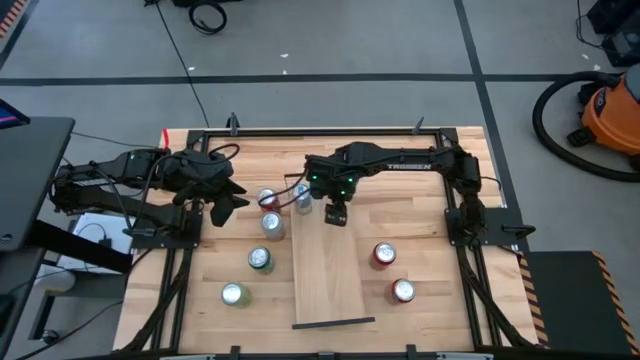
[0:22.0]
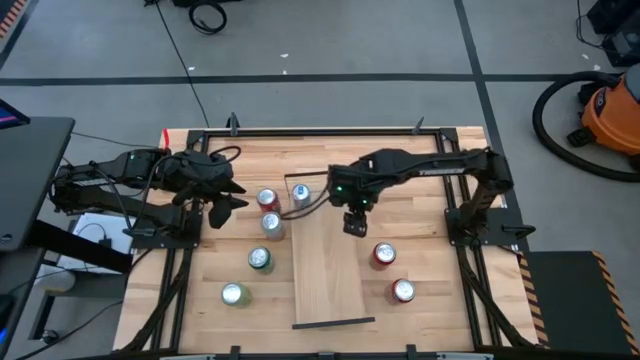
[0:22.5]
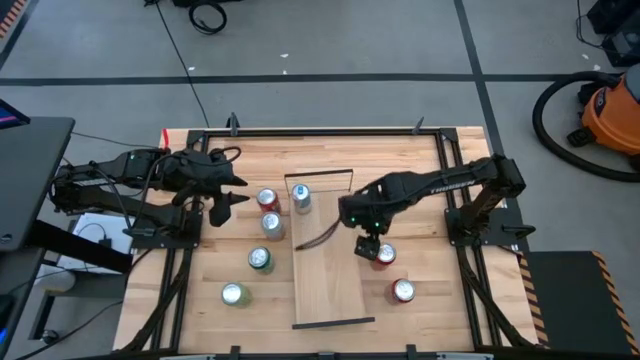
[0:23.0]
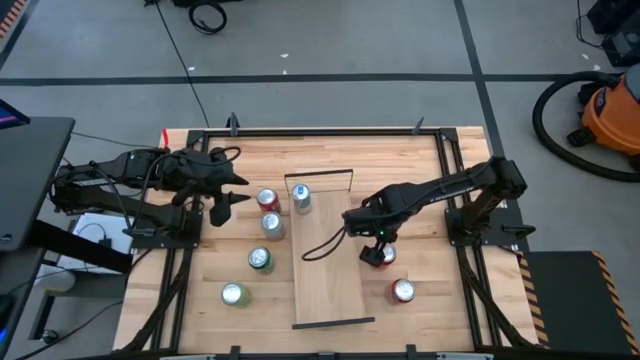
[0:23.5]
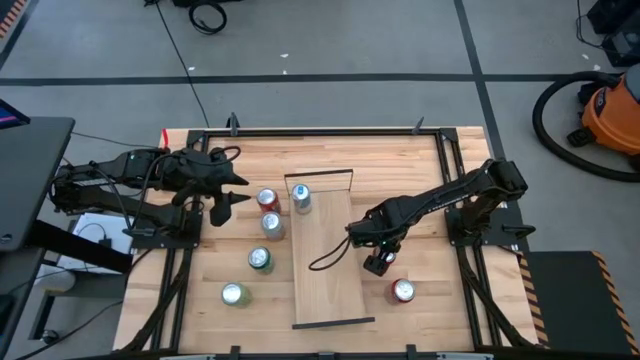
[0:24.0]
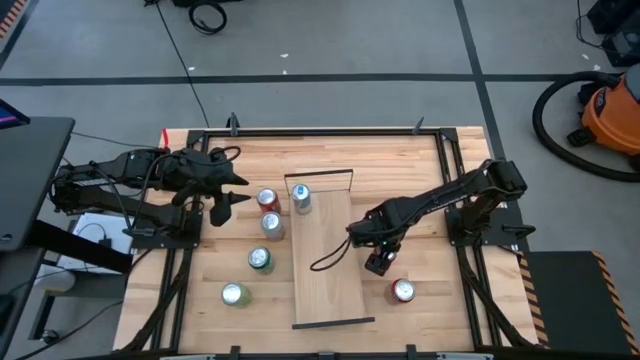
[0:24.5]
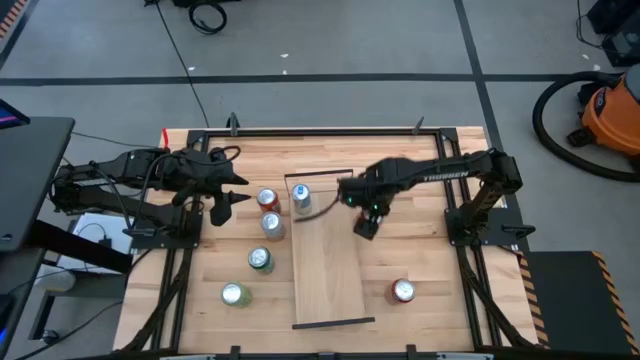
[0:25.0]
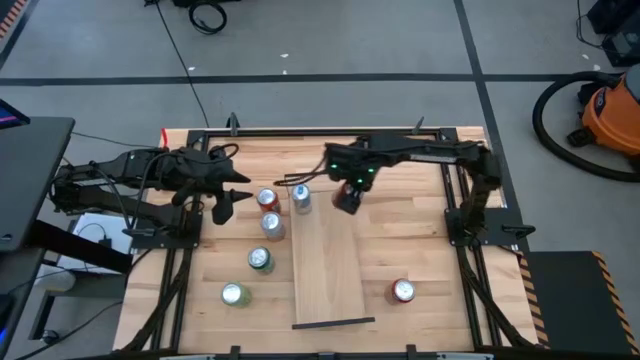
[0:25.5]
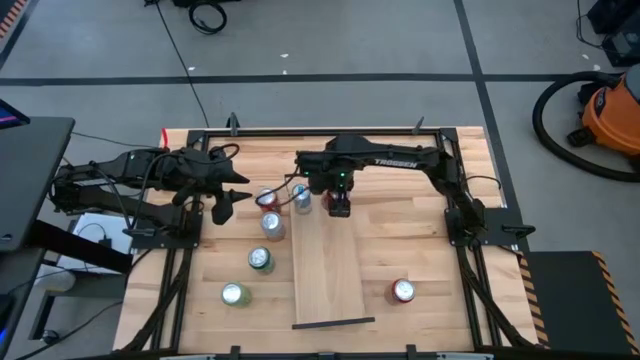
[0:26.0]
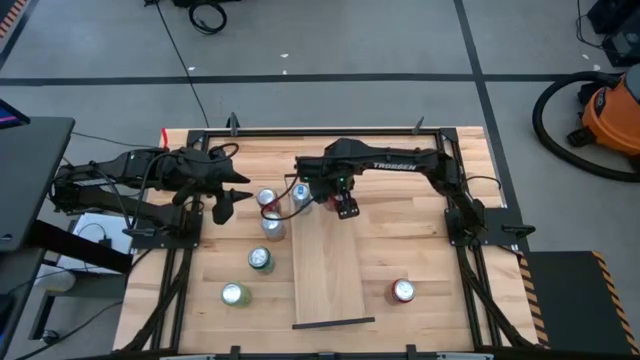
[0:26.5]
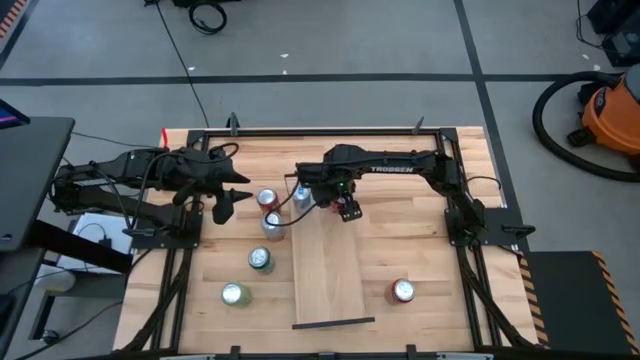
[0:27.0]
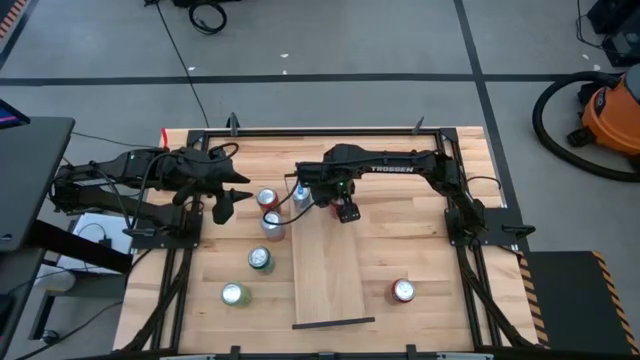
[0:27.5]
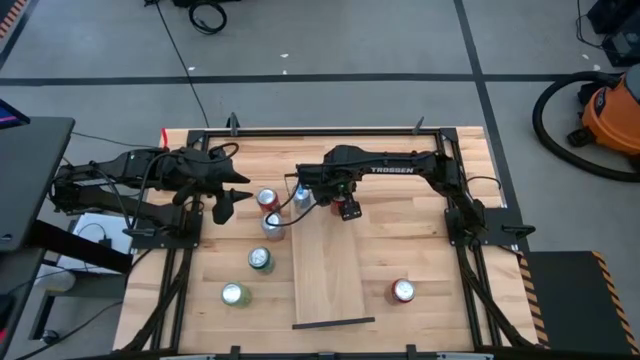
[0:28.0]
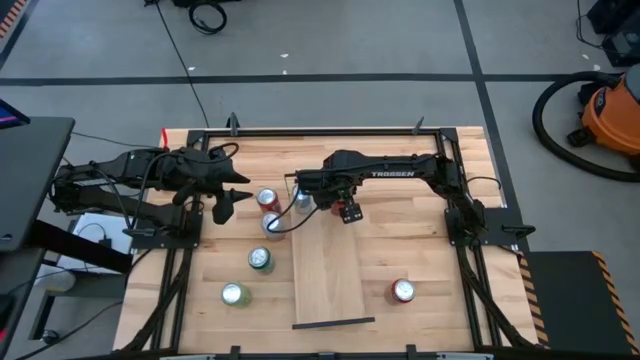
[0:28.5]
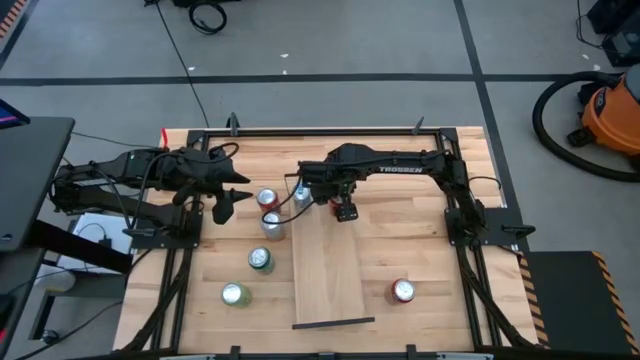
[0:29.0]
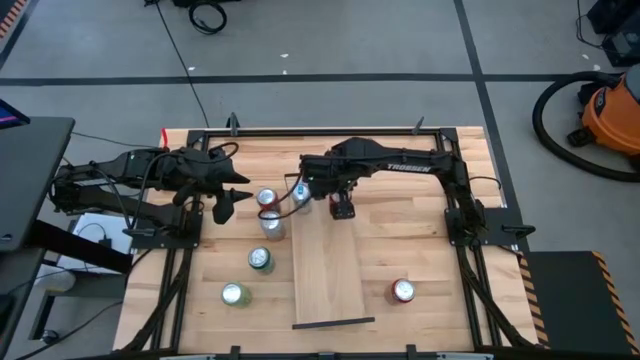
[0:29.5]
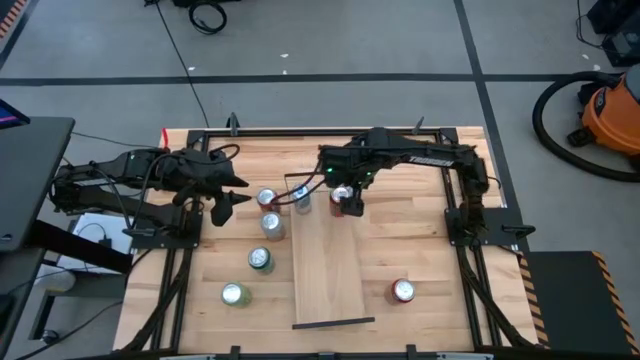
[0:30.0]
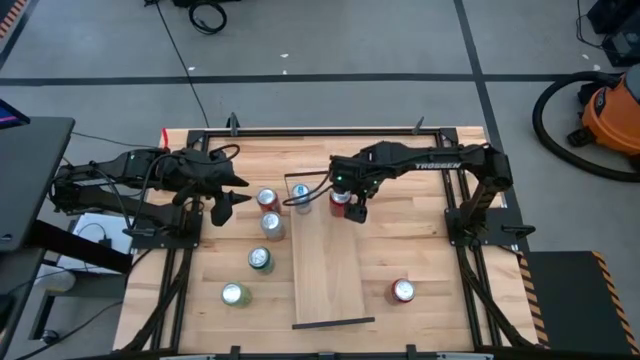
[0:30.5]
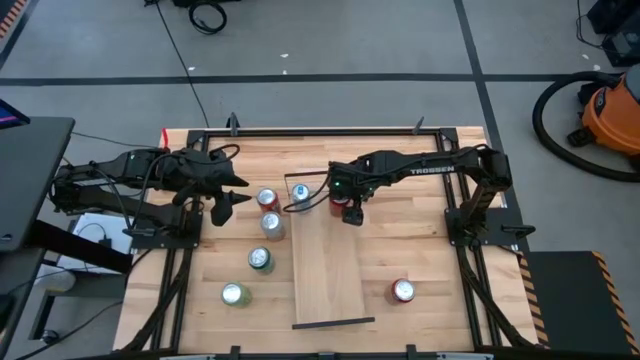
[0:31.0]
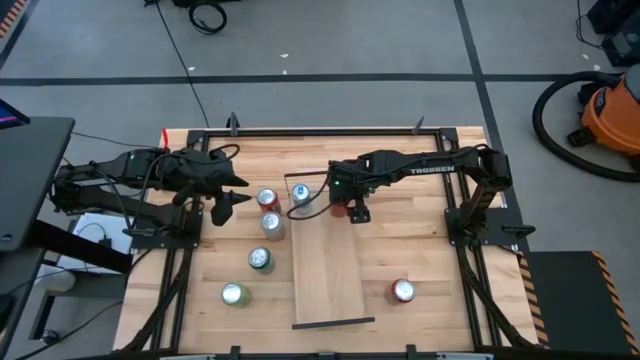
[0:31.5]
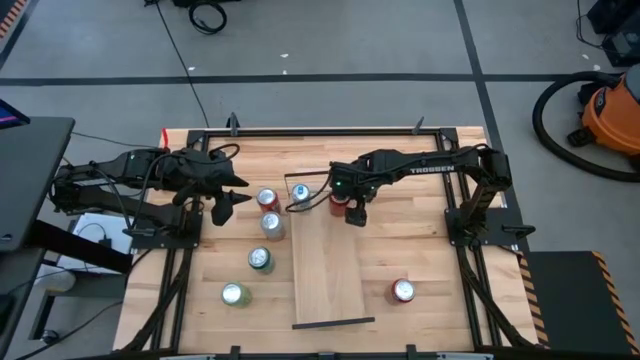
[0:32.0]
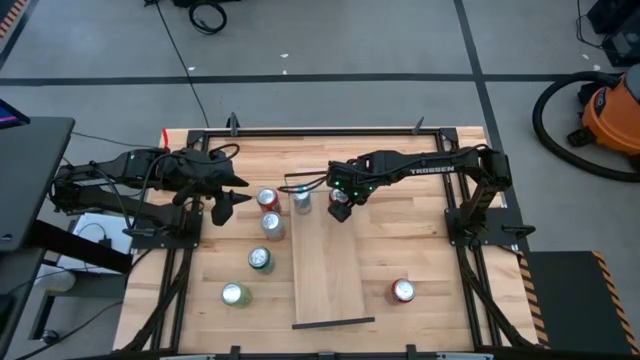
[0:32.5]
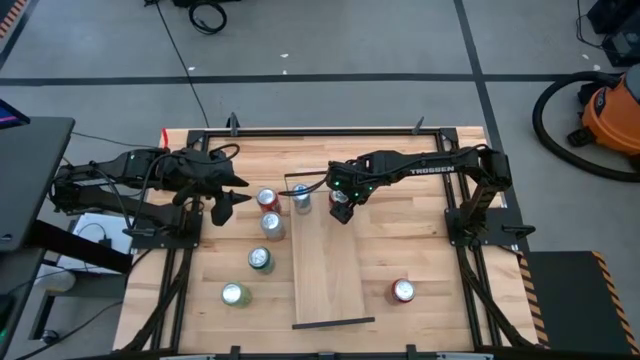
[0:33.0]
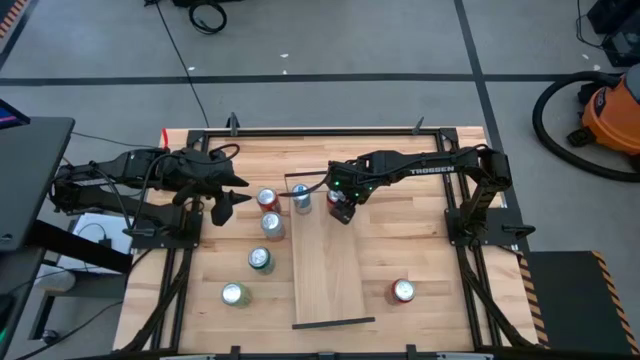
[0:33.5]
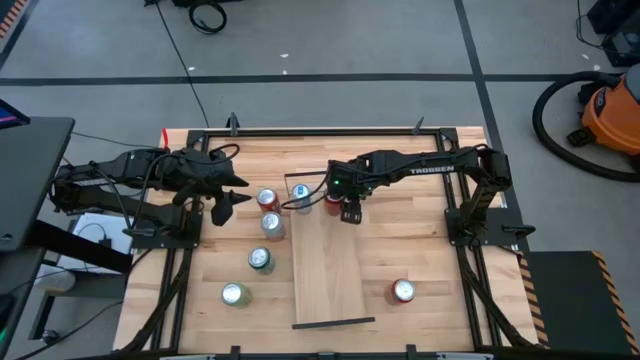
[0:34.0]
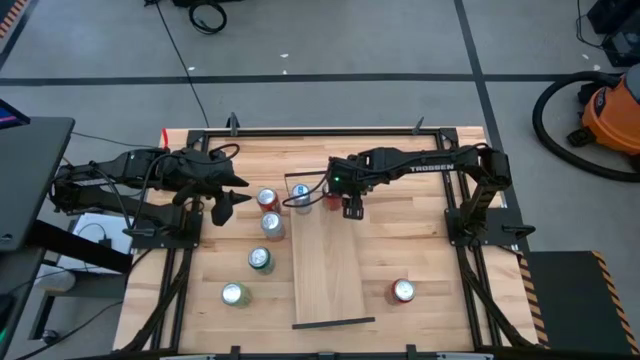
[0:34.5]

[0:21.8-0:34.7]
Task: Place canned beverage on shelf
Put the red and black soda can on the shelf

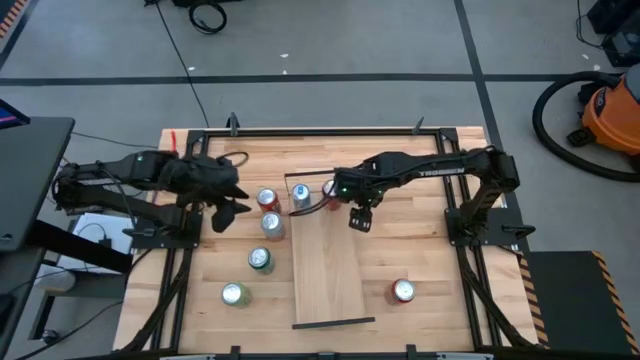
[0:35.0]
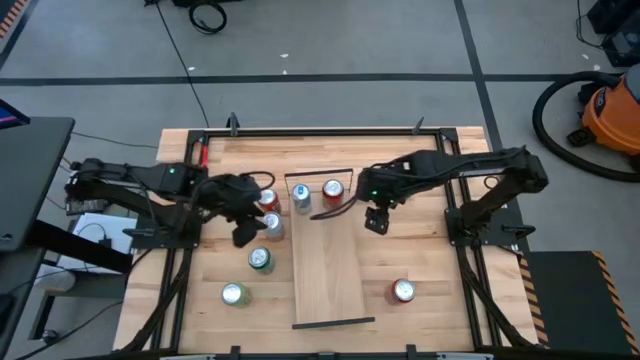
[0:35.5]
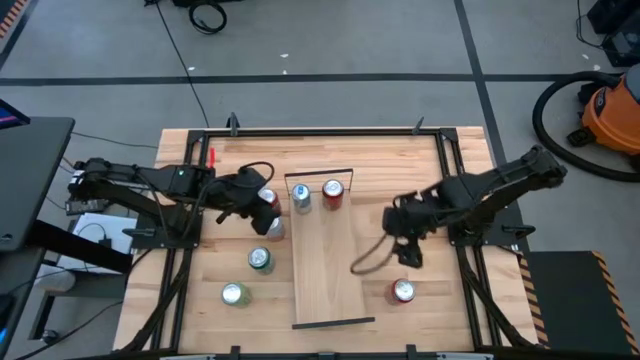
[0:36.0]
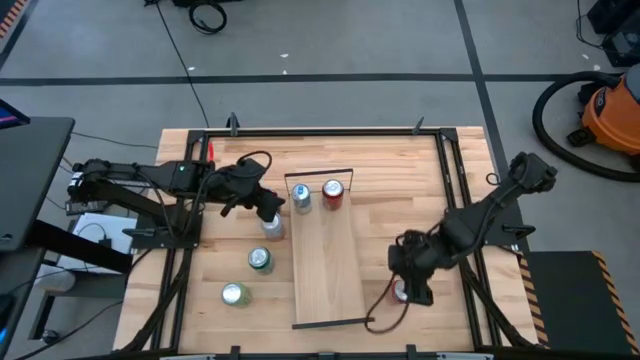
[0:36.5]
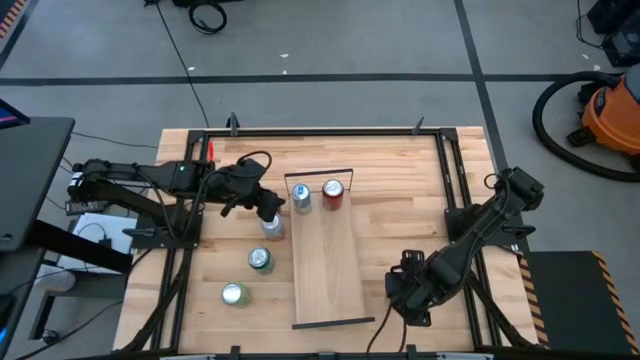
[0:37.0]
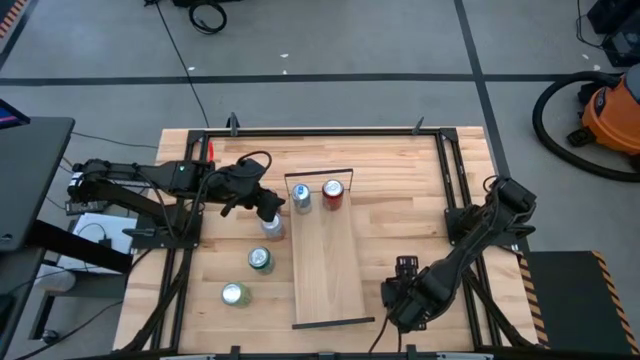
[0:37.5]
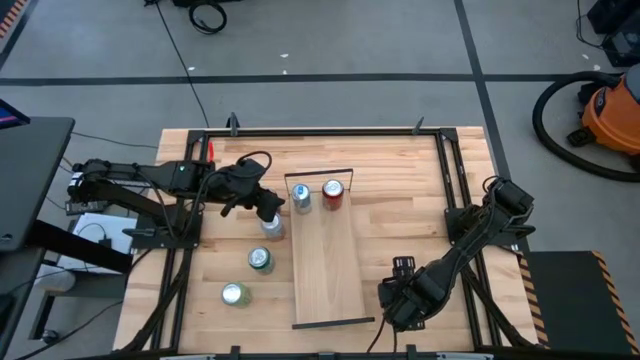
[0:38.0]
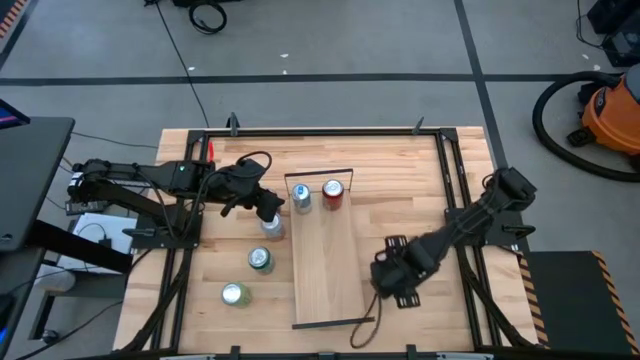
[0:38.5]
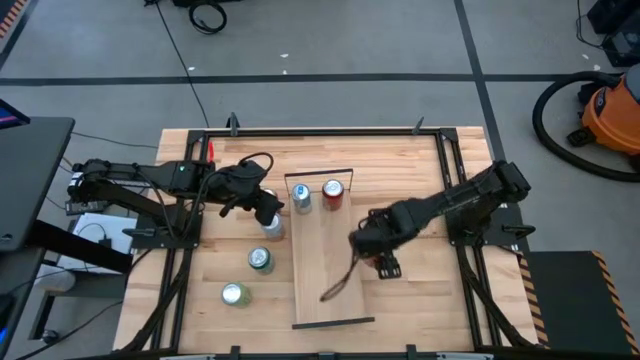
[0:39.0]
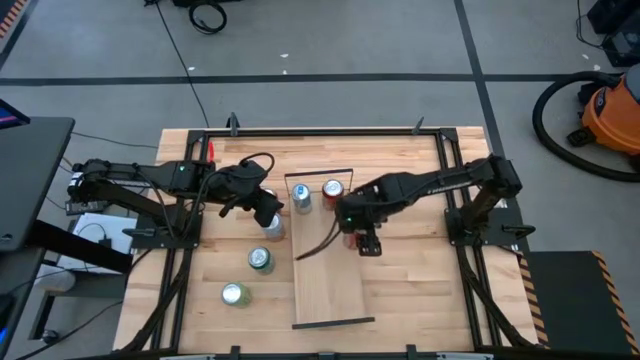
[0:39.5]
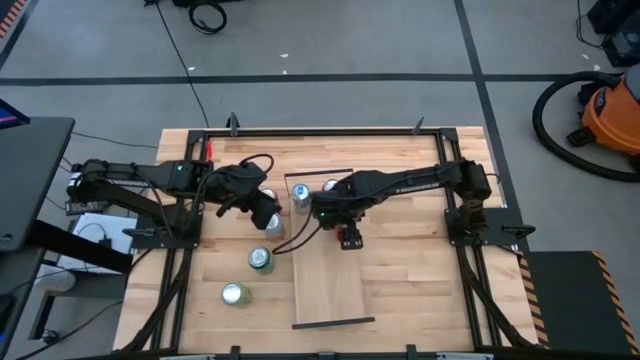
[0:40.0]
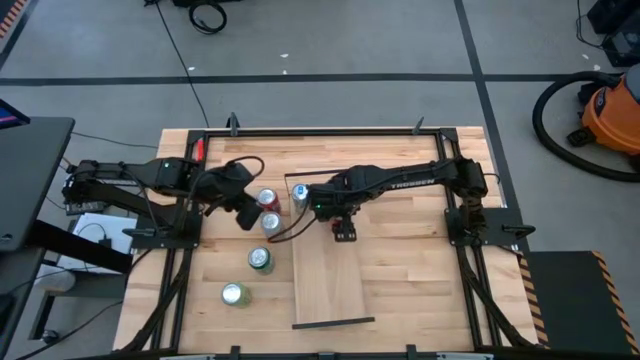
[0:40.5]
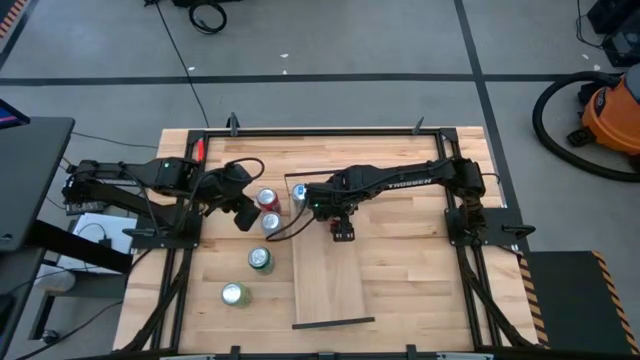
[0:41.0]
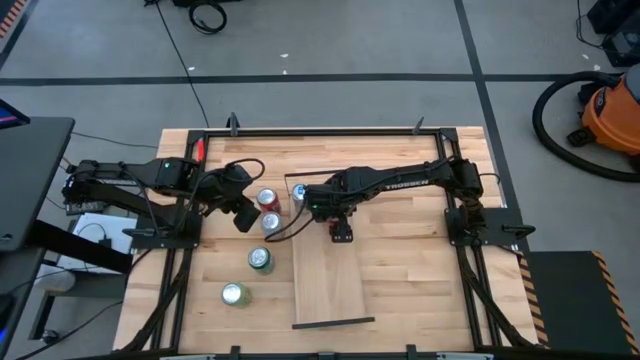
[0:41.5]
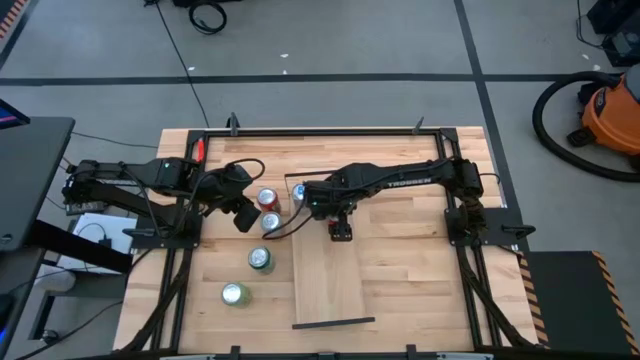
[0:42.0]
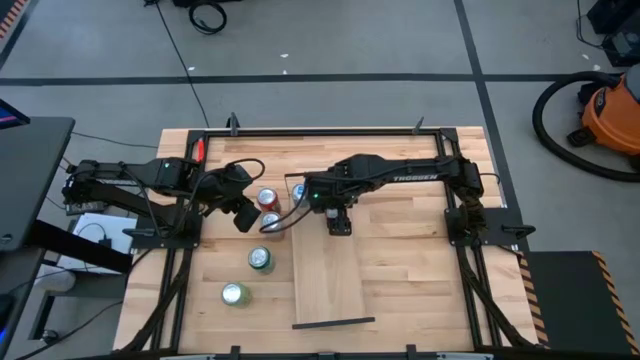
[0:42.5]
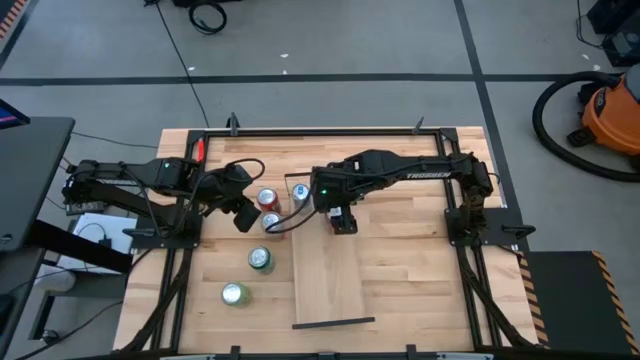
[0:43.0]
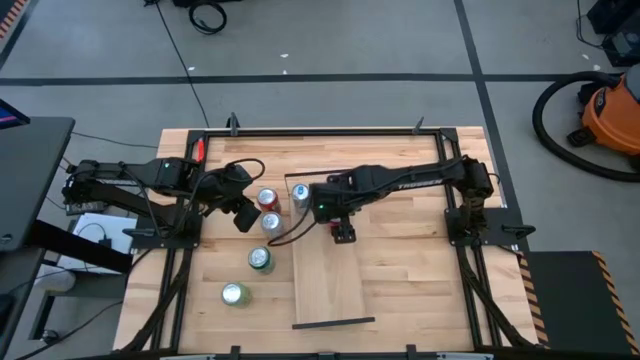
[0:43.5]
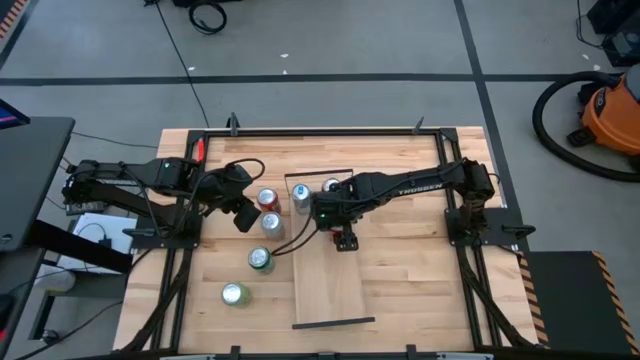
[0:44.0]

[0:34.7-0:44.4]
Put the bottom red soda can on the shelf
